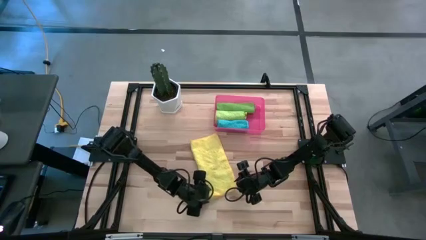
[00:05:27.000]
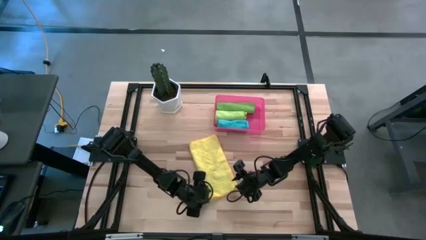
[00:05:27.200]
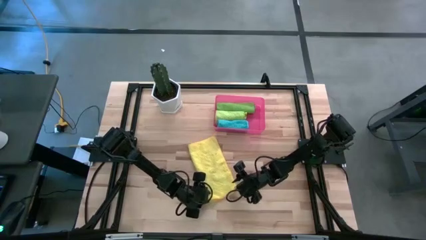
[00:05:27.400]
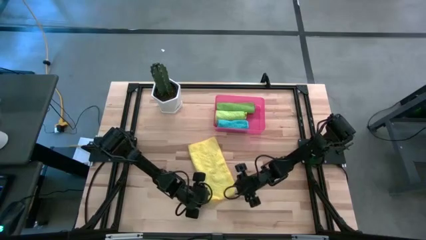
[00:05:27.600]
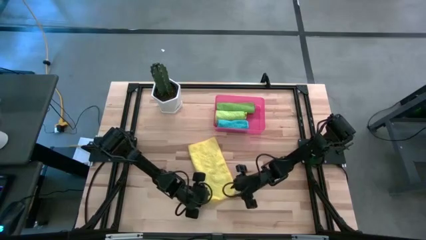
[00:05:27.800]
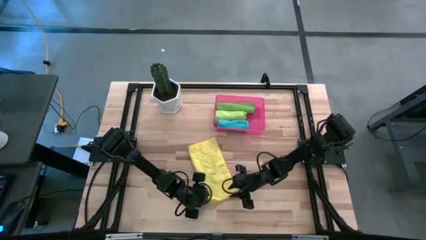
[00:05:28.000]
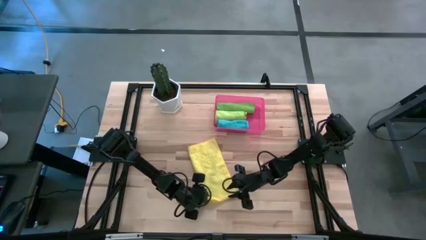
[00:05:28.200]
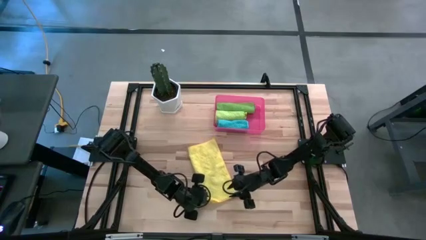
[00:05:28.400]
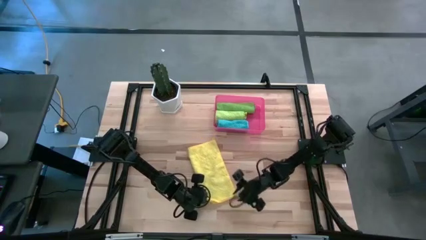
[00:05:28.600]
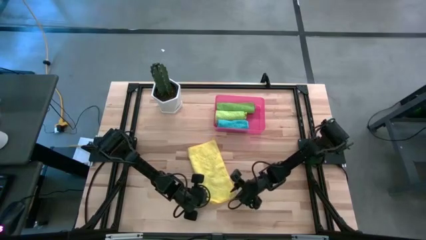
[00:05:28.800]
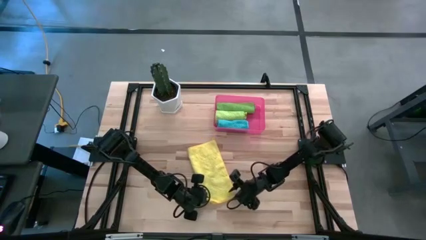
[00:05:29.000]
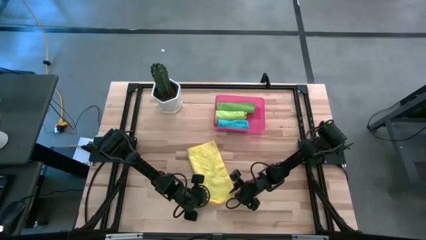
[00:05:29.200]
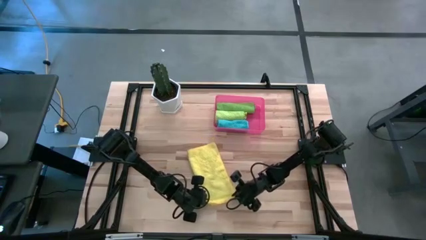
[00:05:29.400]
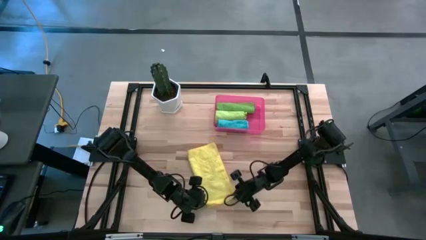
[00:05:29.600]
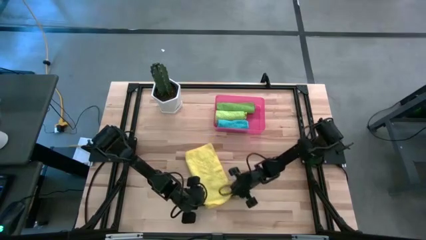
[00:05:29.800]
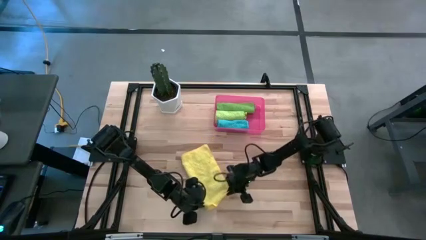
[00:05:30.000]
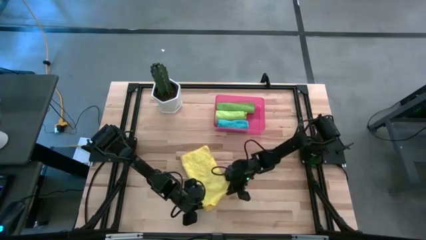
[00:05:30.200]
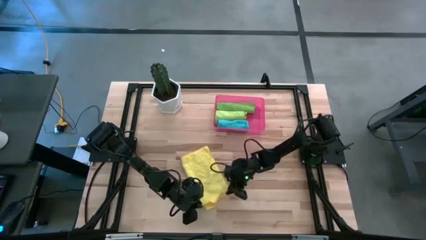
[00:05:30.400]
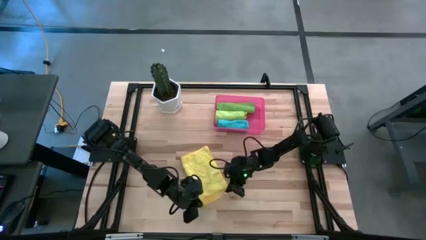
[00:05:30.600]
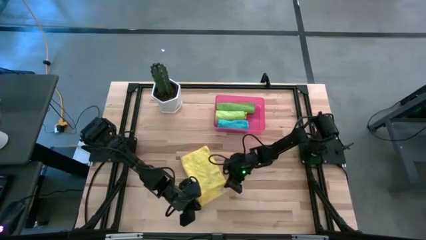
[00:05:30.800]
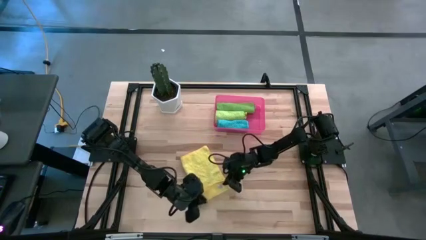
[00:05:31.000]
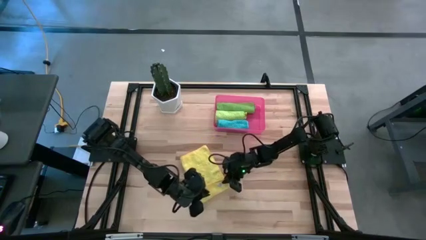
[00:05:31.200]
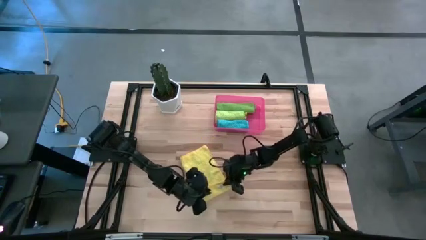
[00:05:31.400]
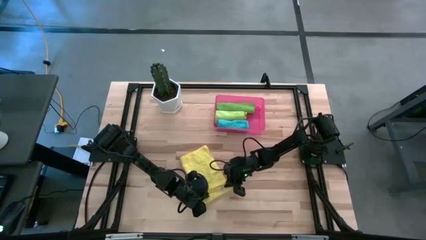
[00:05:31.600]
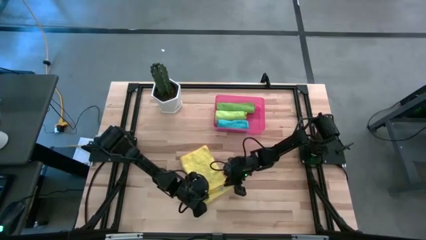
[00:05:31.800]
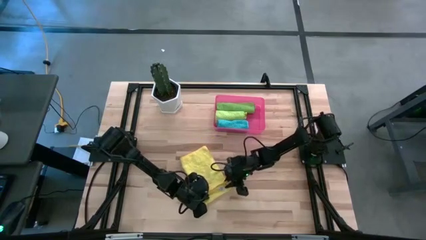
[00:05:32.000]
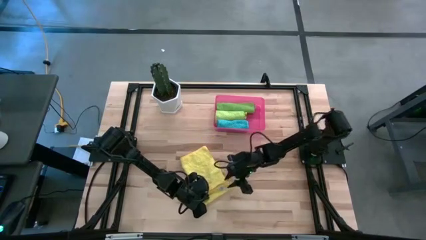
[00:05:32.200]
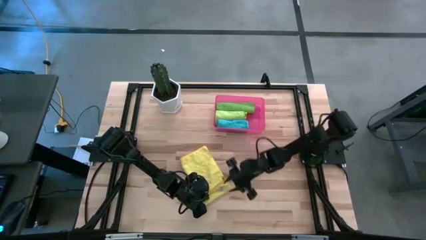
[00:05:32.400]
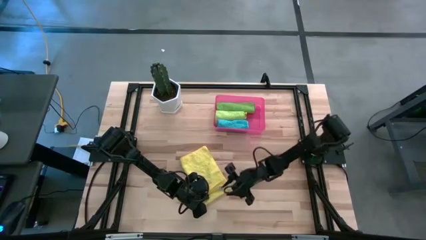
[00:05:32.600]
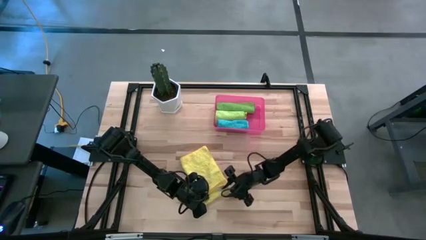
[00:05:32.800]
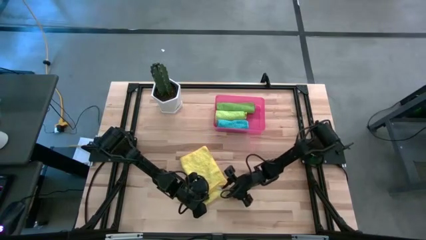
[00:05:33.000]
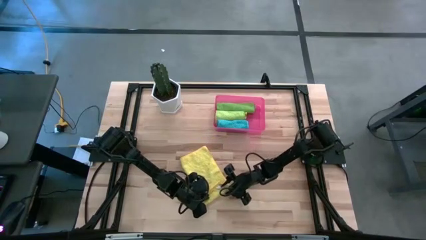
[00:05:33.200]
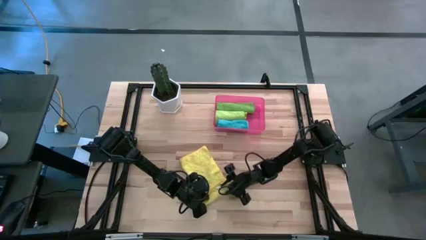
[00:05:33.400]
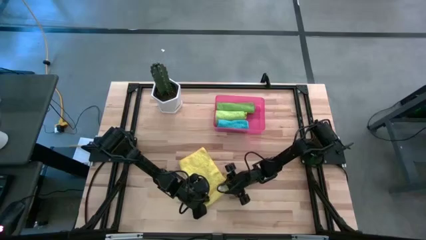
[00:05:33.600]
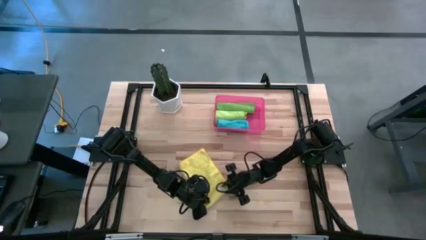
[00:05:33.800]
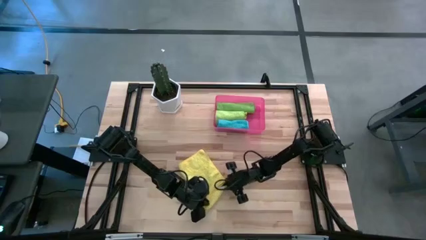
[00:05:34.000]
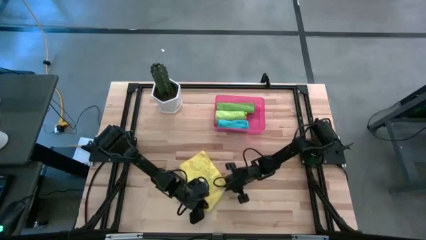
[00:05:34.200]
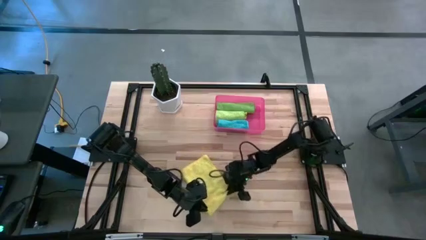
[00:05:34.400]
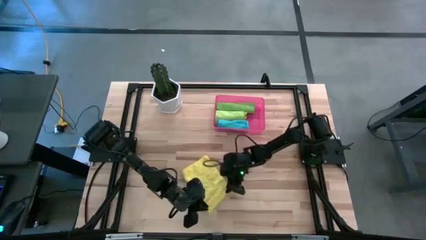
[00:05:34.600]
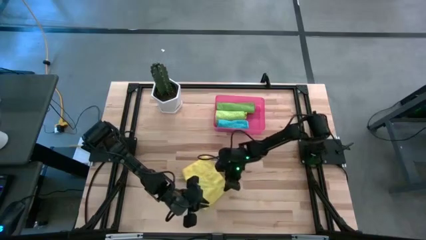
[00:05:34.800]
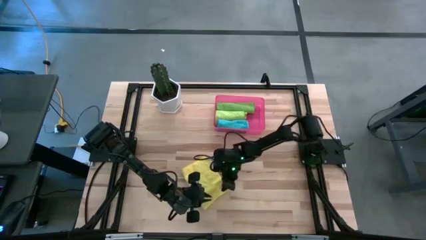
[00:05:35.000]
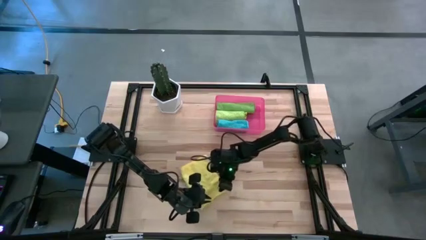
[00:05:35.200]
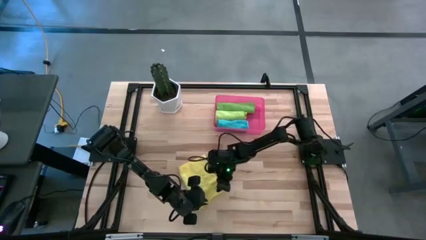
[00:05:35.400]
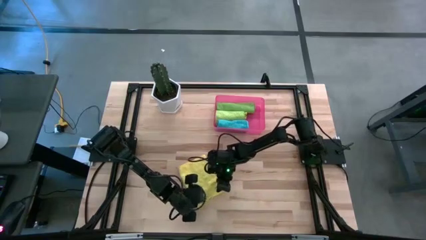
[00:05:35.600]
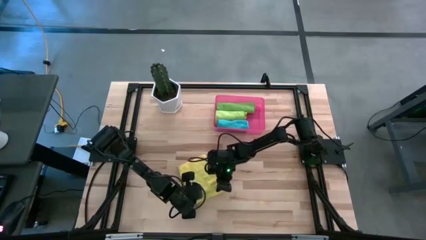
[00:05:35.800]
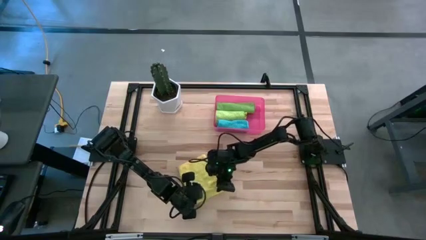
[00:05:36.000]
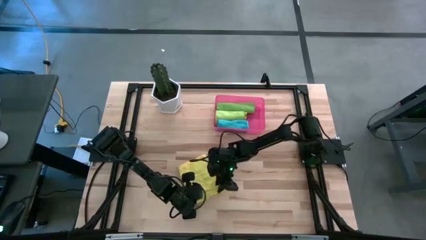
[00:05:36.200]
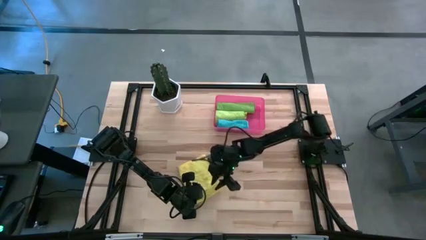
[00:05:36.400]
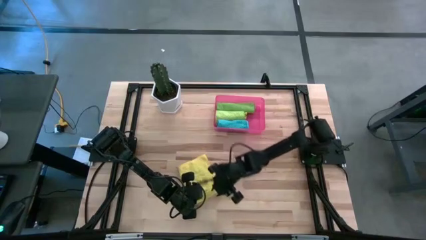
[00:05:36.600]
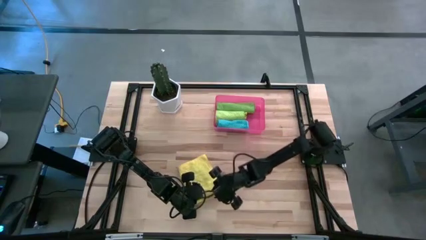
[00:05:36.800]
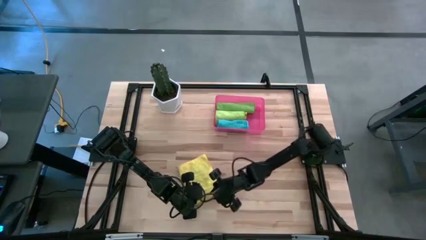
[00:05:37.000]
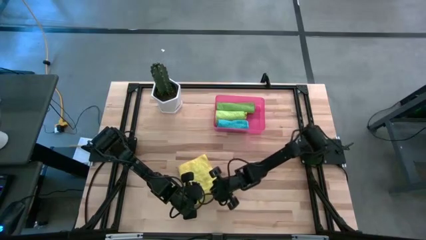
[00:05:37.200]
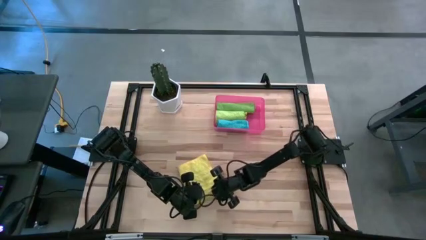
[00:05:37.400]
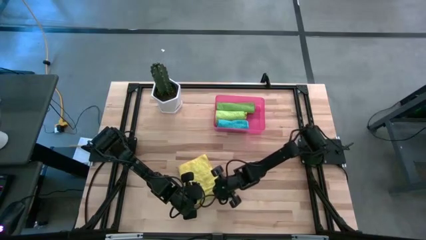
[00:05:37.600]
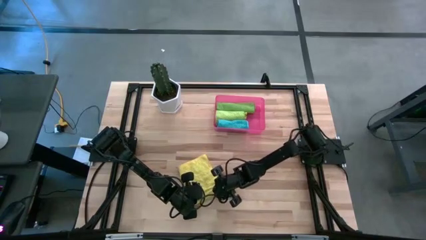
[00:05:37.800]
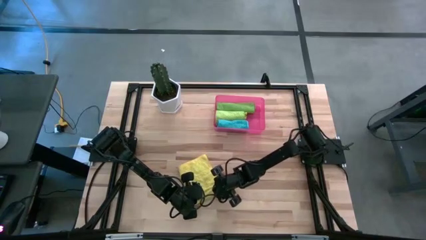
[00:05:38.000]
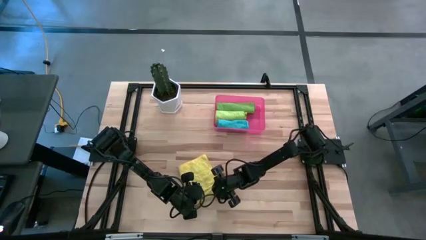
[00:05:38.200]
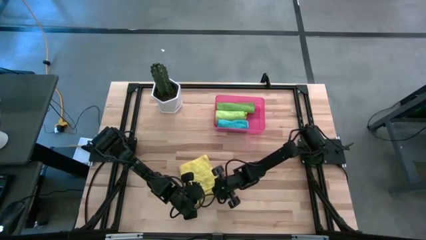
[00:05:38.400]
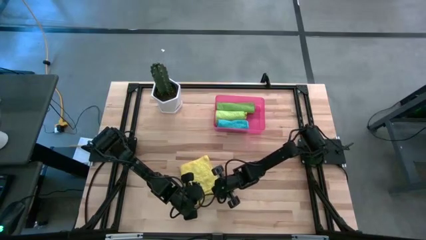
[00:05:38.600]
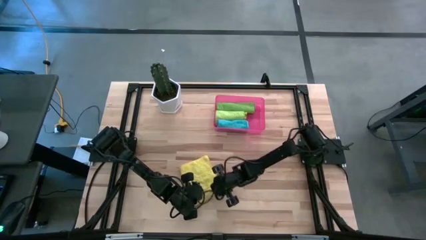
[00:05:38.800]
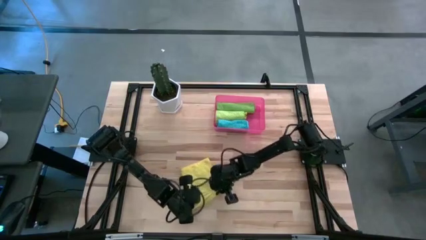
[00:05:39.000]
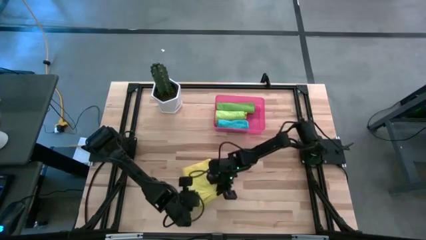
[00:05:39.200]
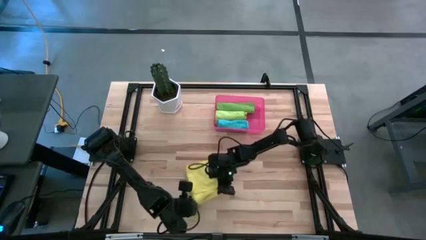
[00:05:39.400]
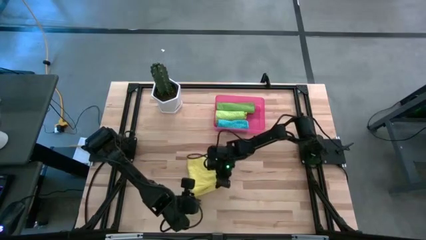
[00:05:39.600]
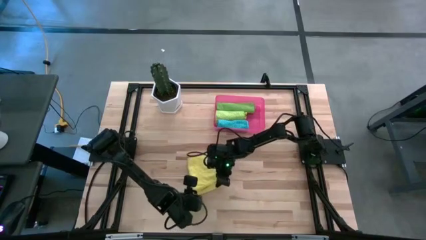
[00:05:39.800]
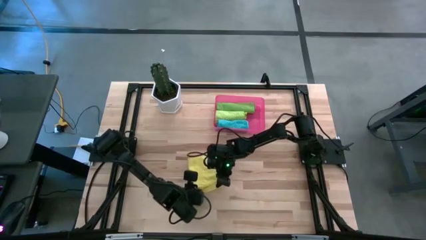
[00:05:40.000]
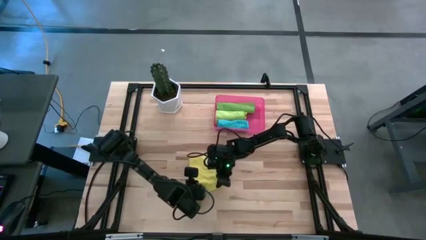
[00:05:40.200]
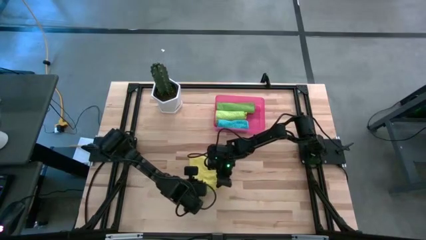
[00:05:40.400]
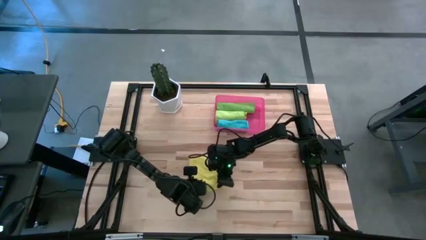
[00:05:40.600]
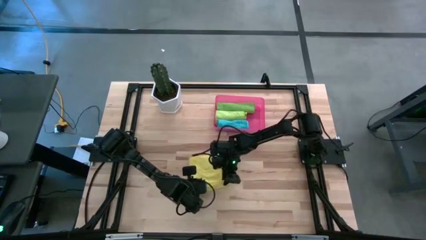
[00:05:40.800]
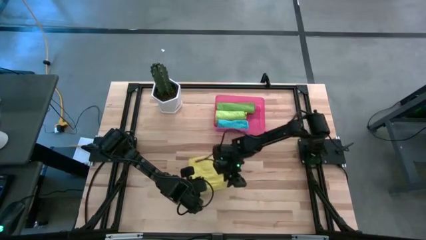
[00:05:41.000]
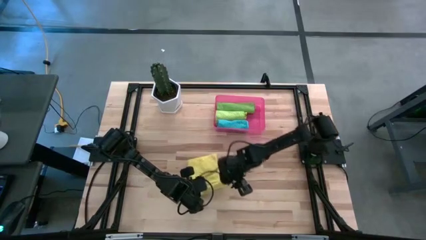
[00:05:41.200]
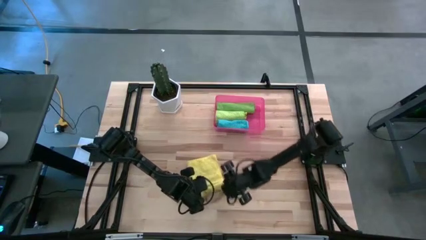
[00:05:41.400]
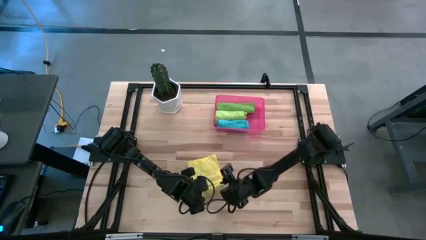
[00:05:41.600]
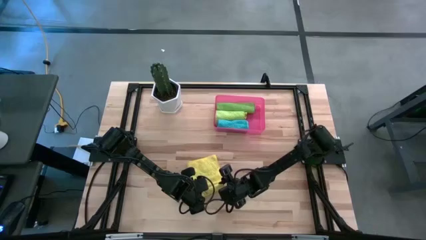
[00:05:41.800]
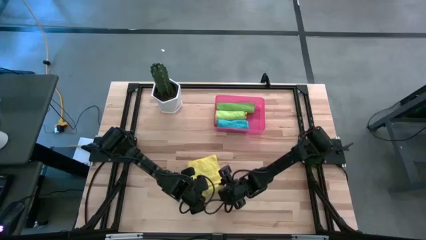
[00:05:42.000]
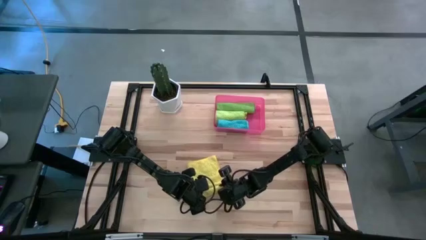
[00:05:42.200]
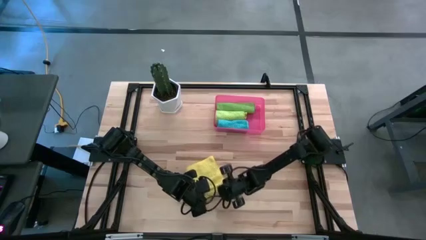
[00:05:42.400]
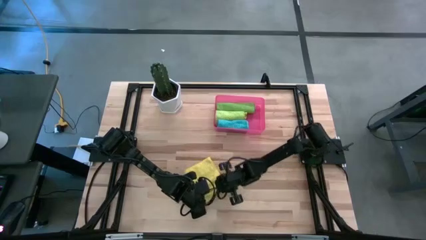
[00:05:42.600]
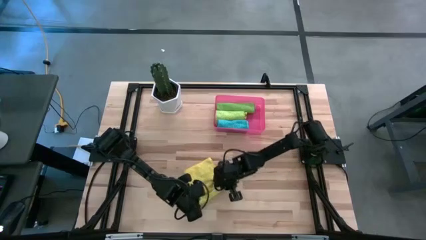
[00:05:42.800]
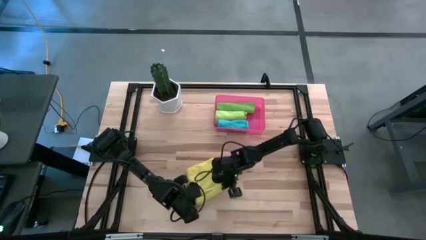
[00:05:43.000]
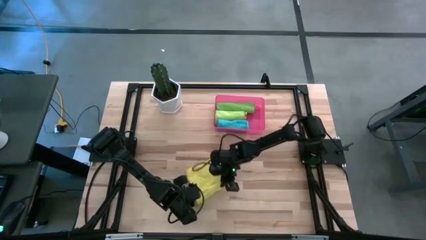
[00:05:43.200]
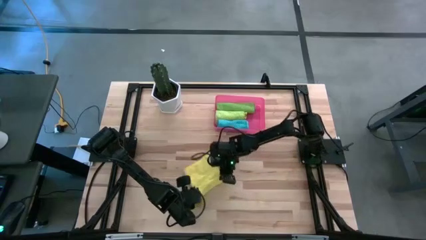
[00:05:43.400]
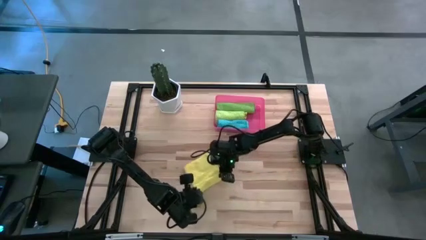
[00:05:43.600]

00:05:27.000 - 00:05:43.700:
Task: Roll microfiber towels into tight, uniform cylinder then place into a basket
Roll the yellow microfiber cloth
